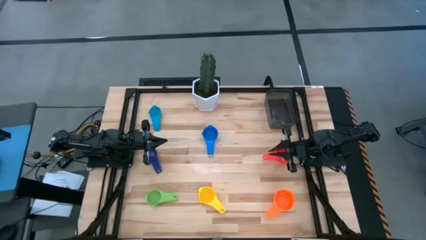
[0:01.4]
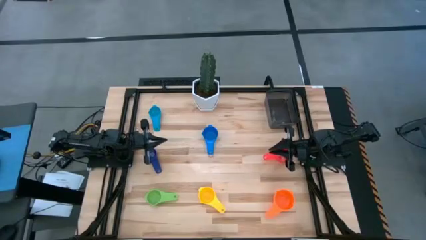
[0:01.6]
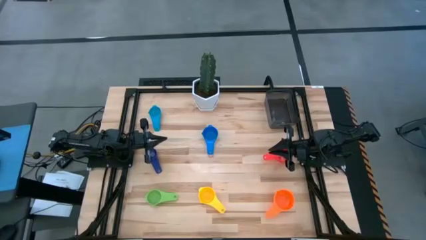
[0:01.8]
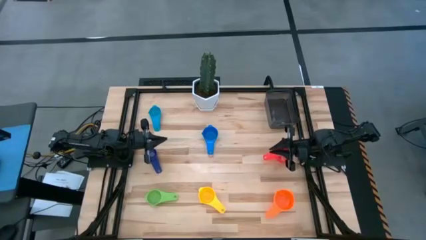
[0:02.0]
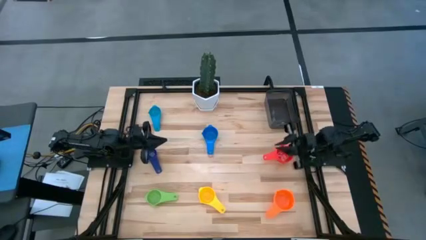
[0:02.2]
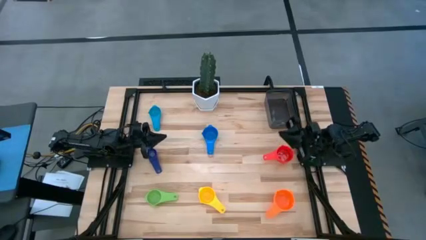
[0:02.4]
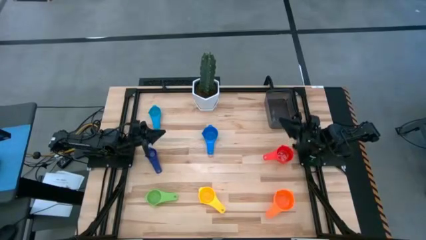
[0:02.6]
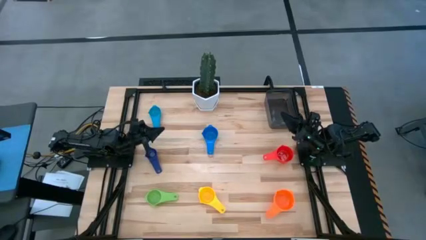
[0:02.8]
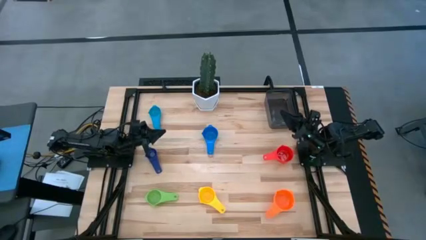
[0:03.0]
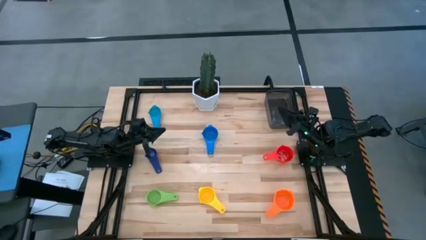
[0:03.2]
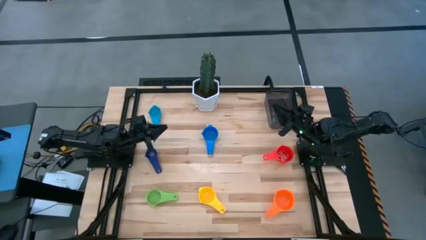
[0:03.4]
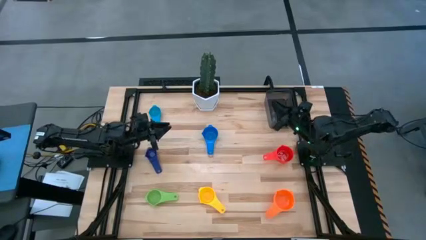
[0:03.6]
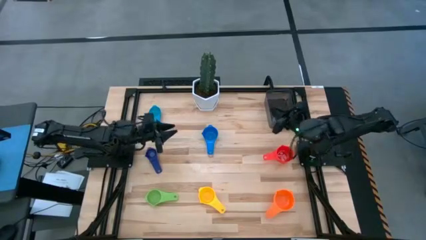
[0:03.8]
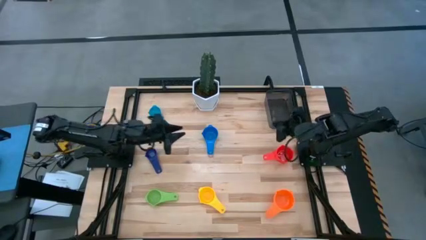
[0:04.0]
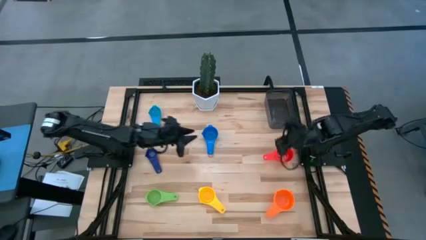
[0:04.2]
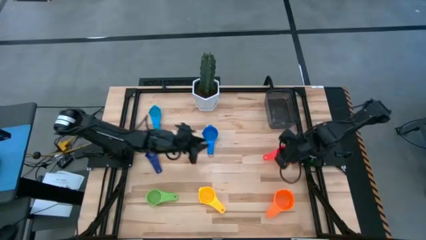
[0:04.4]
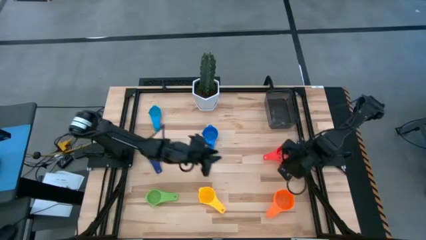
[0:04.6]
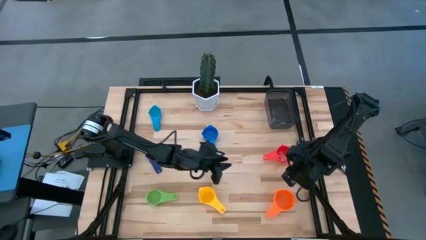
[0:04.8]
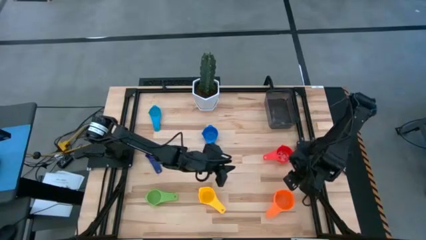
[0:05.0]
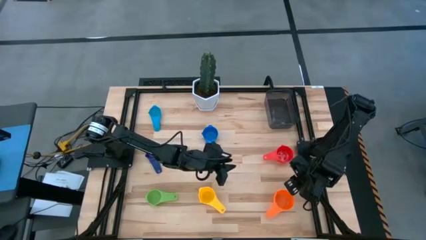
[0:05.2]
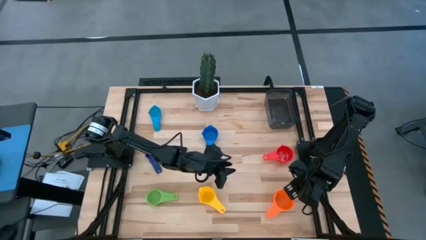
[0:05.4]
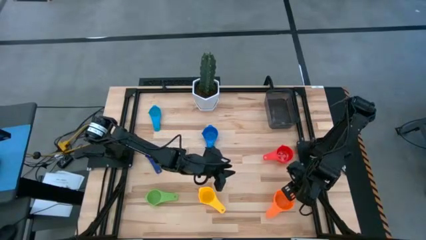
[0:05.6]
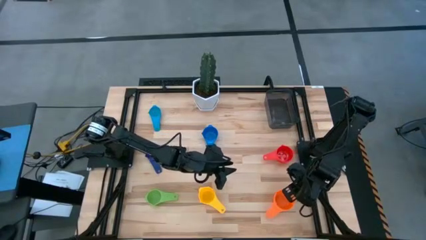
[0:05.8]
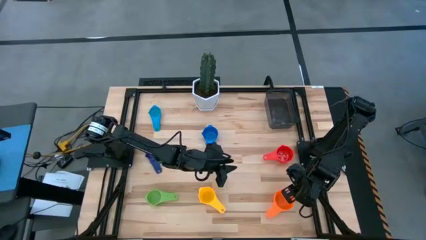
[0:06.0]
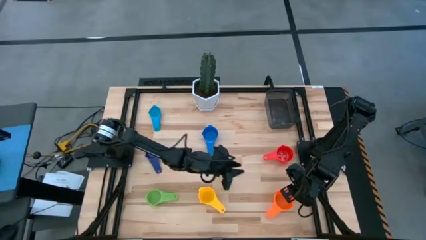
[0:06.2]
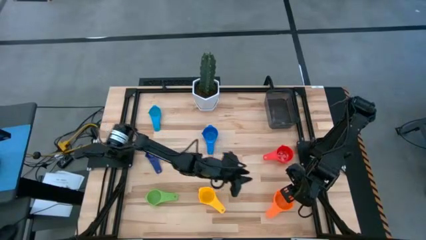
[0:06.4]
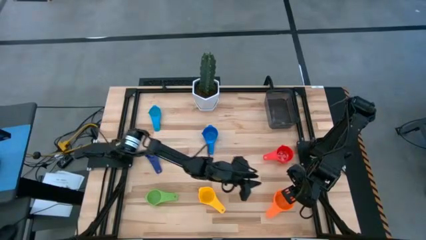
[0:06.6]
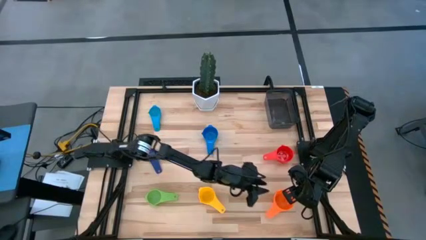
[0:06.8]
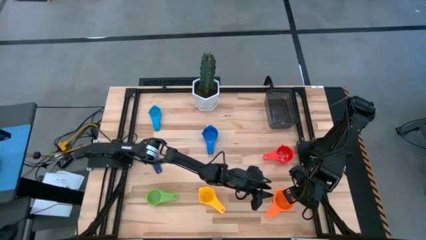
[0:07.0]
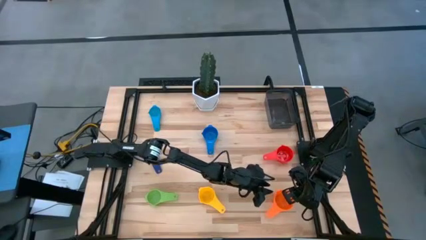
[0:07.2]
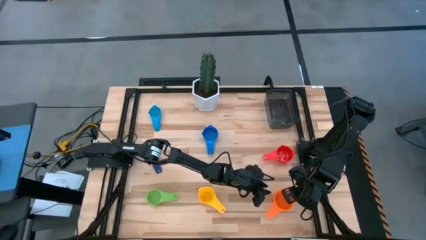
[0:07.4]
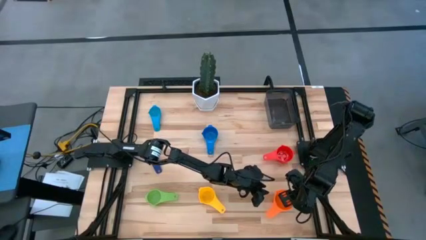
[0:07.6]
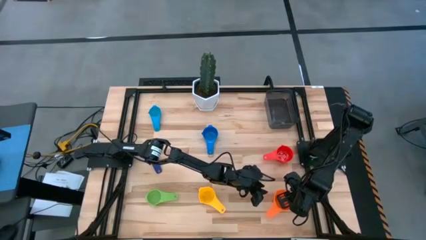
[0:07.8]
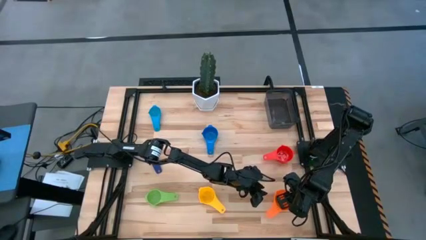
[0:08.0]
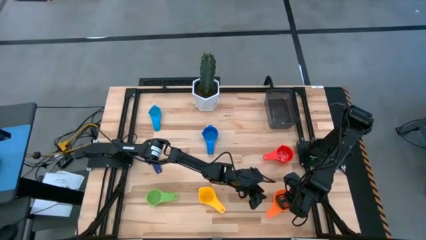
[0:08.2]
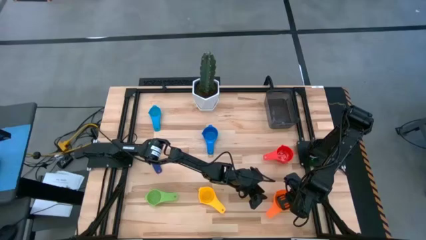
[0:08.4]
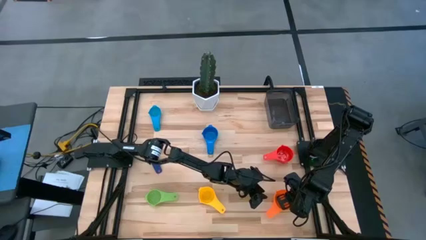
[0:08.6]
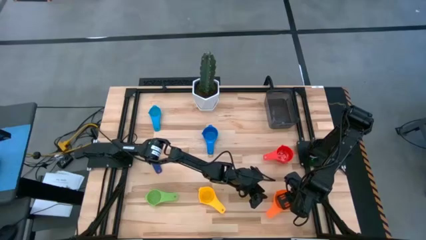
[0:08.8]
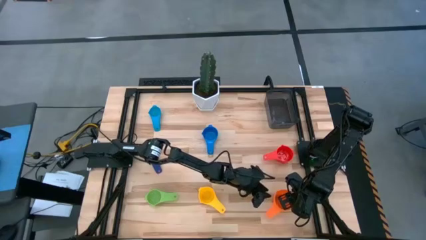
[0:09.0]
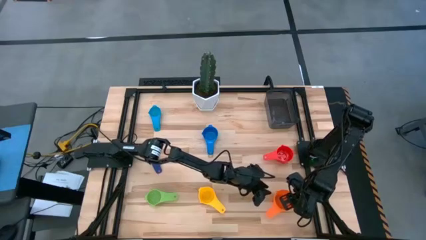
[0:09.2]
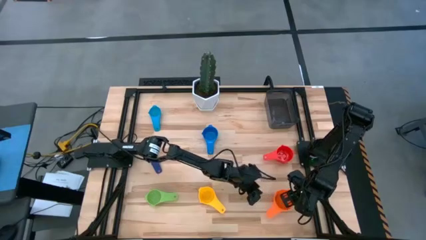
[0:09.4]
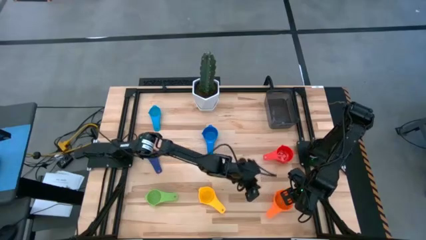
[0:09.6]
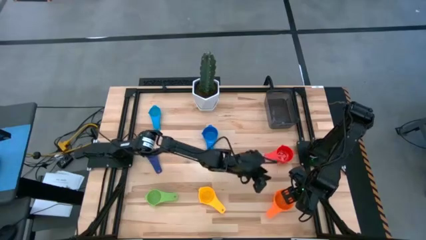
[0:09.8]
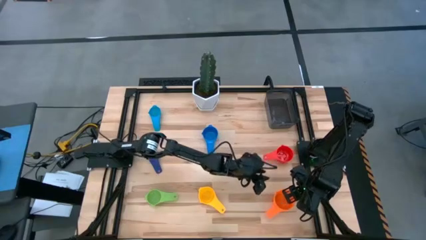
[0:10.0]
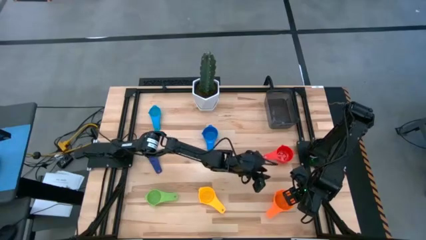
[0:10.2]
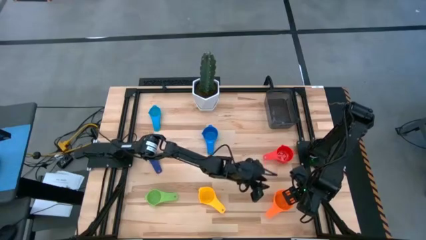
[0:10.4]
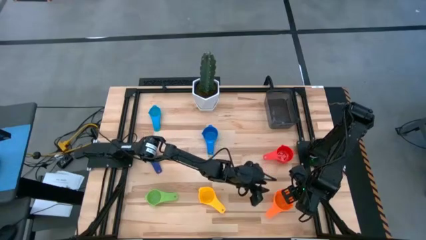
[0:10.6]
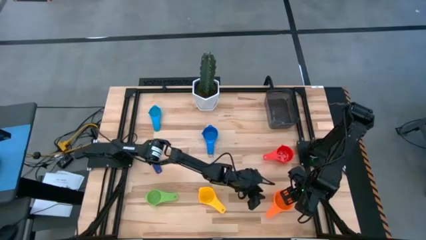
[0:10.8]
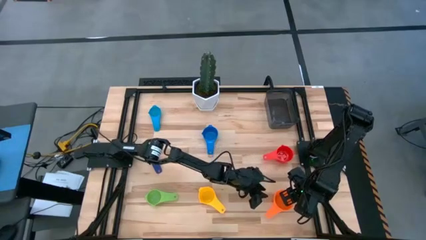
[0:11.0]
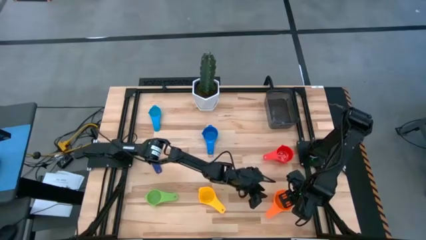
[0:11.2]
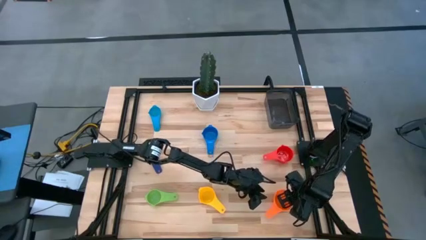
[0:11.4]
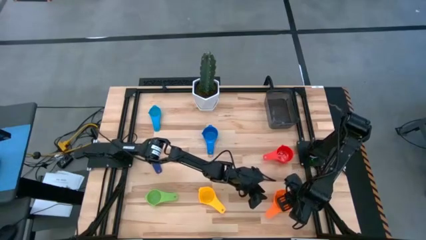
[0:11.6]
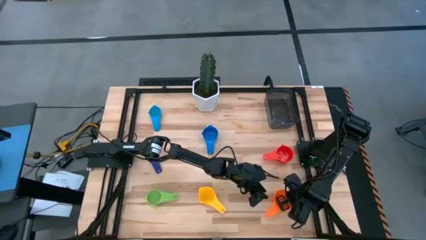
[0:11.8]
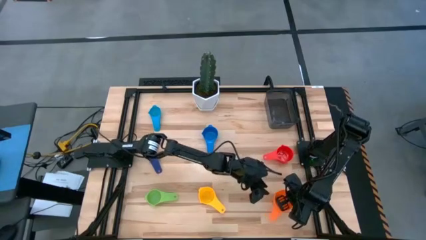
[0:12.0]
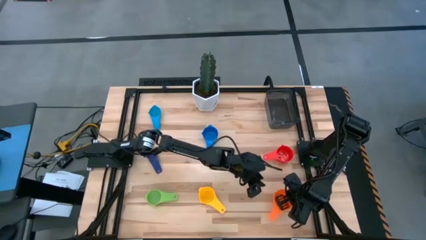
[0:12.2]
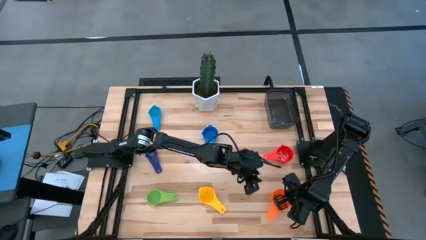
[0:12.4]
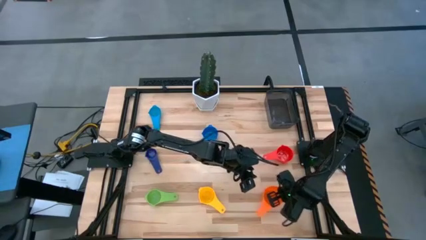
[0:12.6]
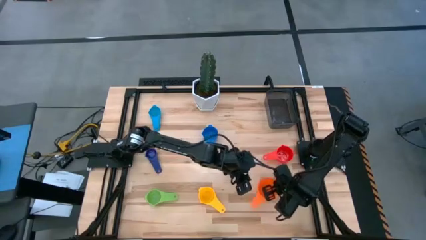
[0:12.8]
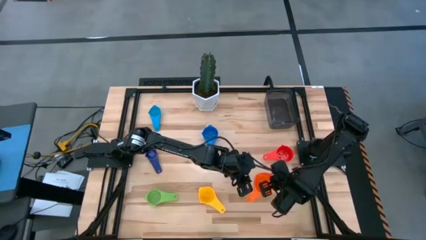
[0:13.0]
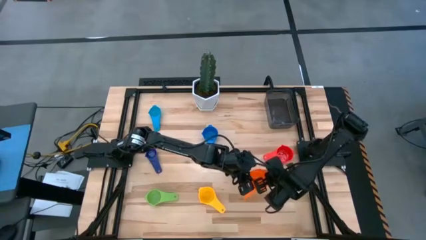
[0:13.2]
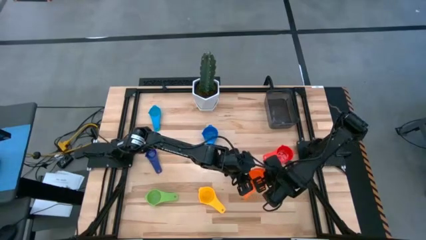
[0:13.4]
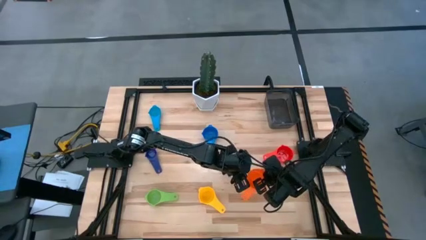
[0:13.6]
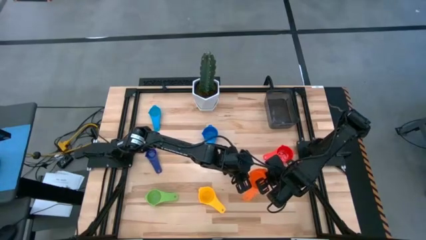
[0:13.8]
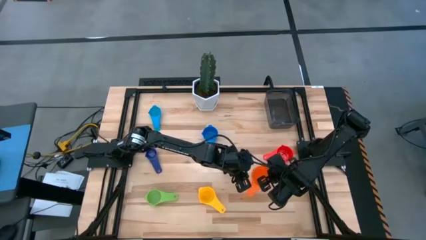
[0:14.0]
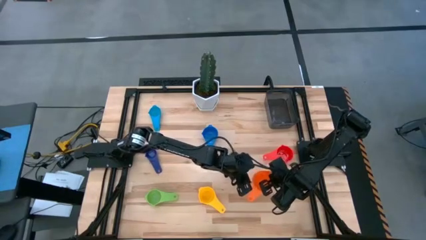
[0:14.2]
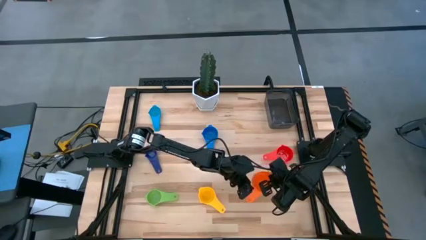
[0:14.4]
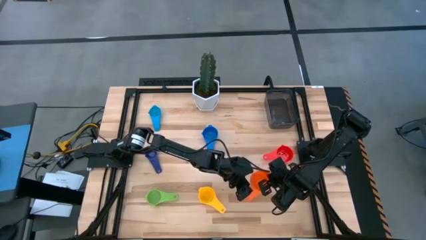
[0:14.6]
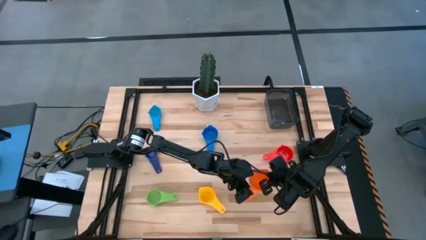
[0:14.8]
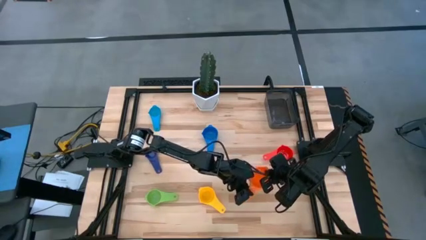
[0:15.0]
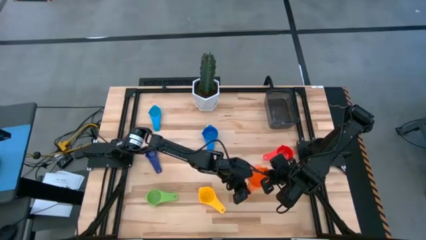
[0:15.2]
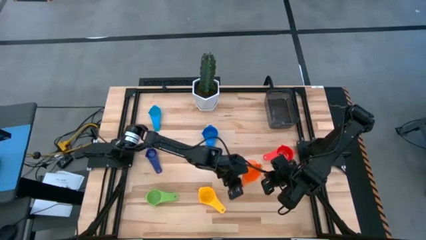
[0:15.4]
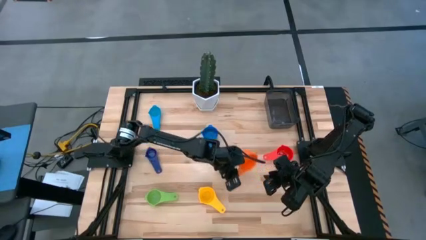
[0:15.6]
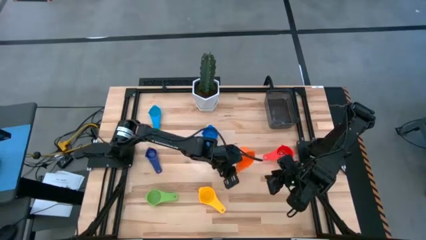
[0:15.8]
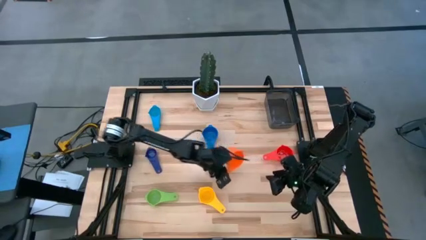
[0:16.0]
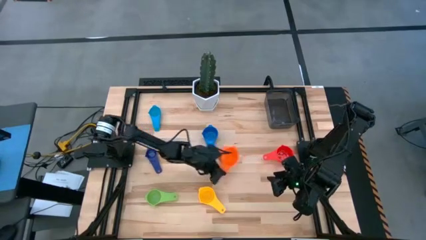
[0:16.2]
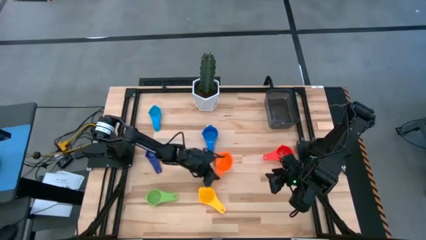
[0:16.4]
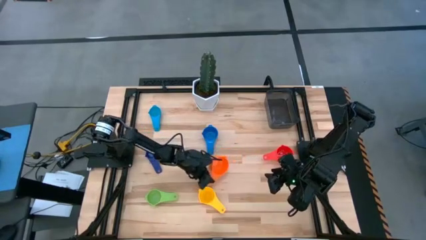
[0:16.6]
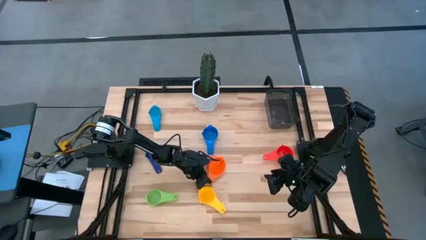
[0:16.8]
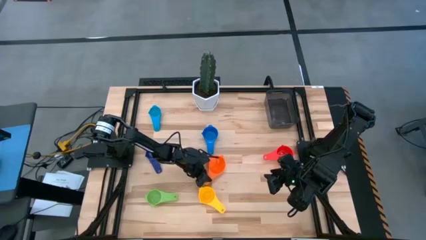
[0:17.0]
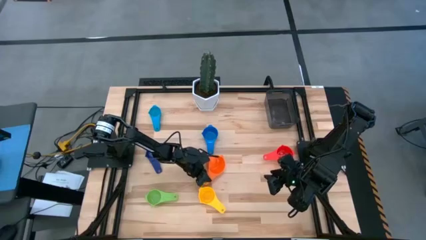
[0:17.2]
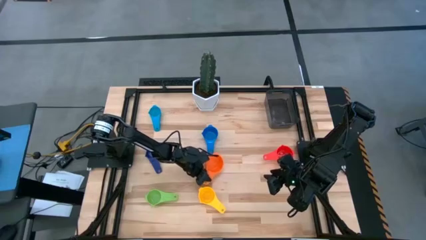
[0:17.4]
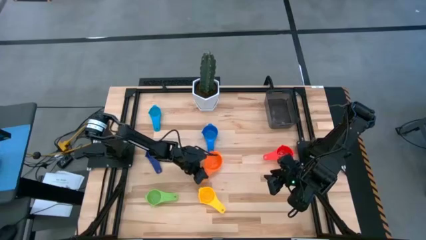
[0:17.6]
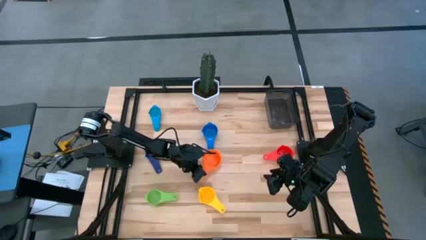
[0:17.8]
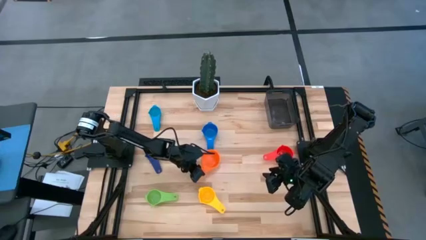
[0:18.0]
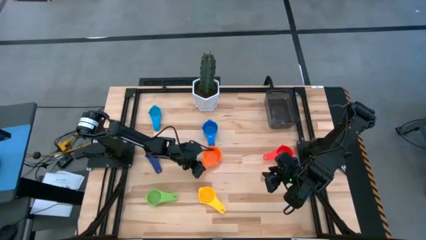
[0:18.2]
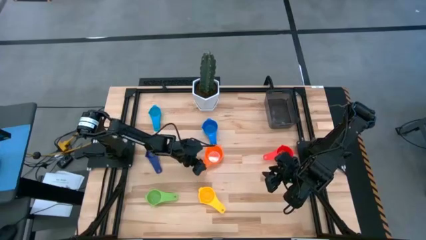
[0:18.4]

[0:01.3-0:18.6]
Task: Nest measuring cups in basket
Move the orange measuring cup to the center of the table
